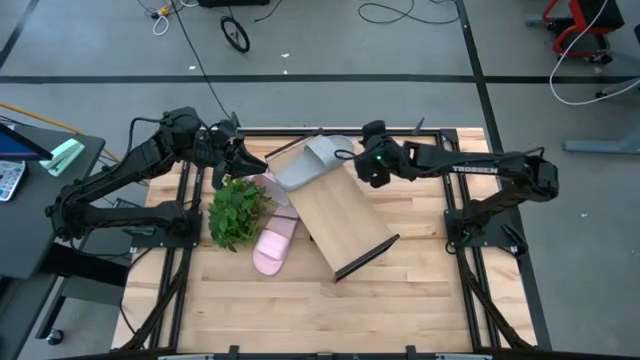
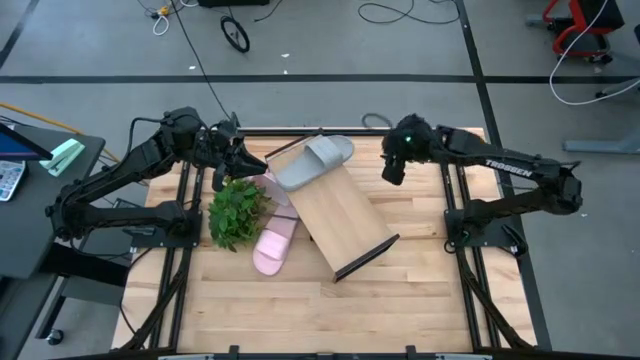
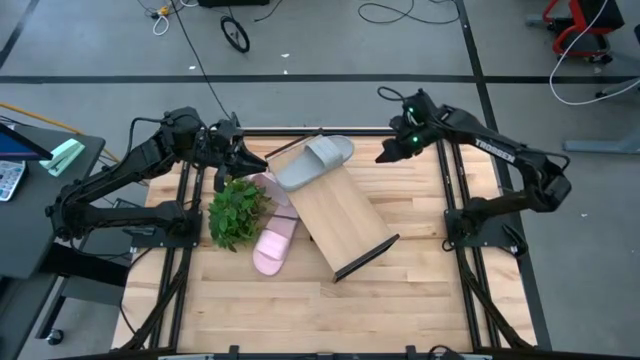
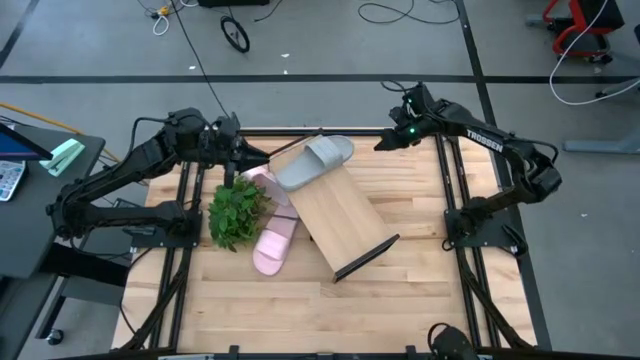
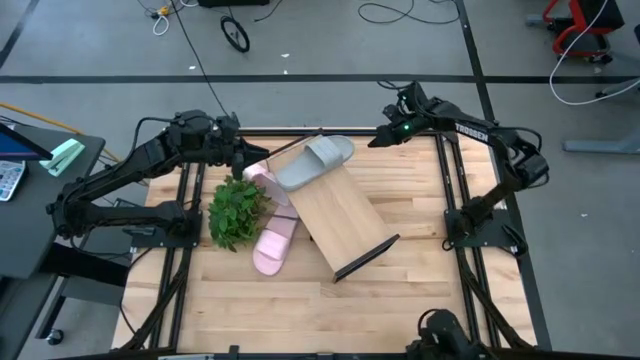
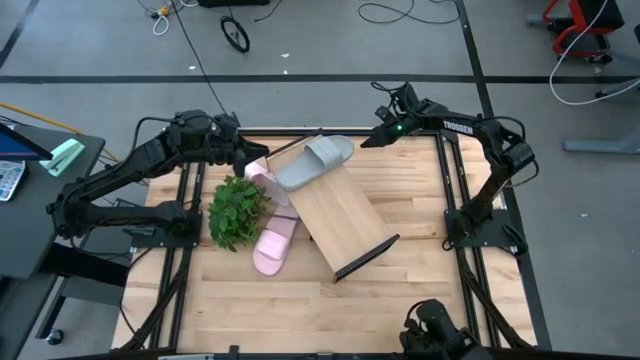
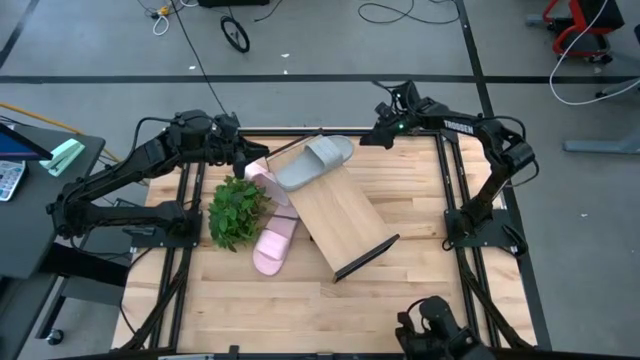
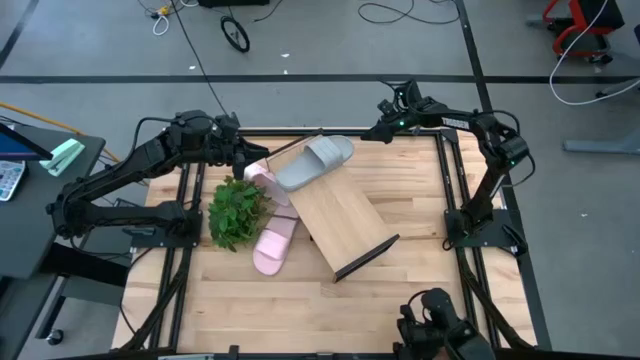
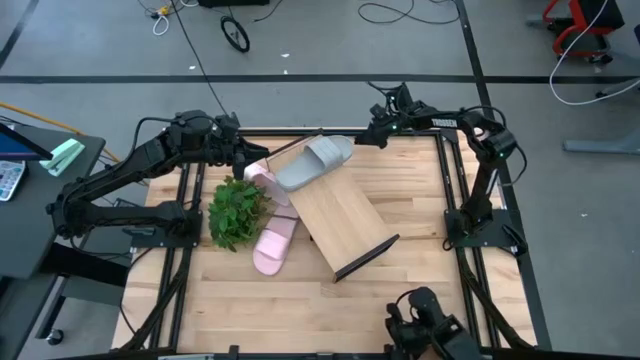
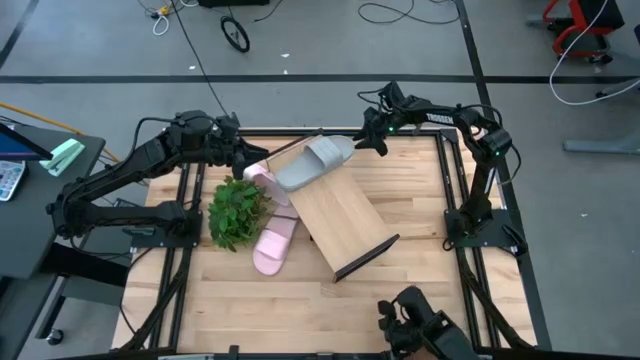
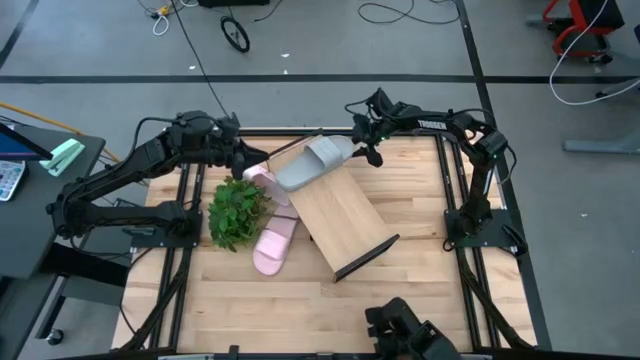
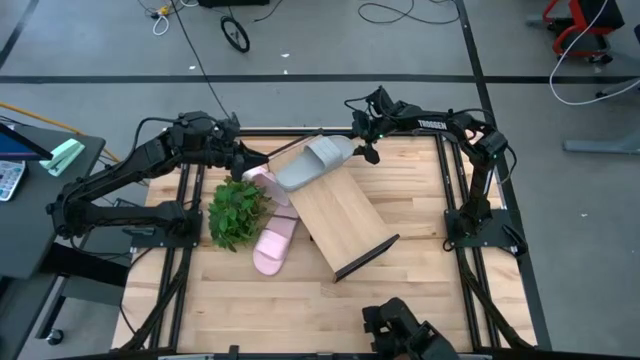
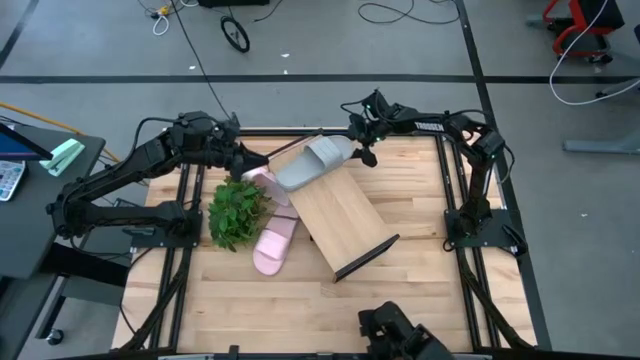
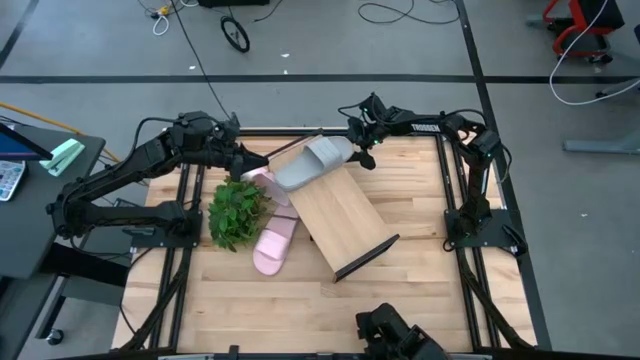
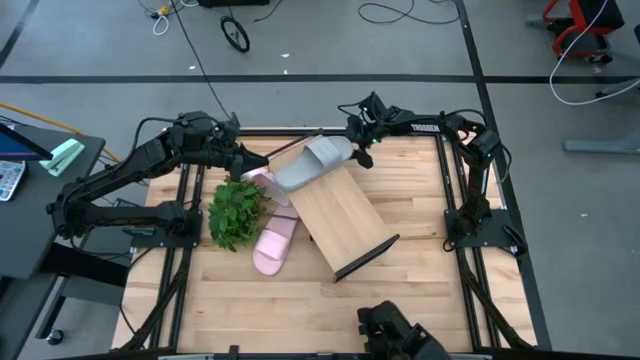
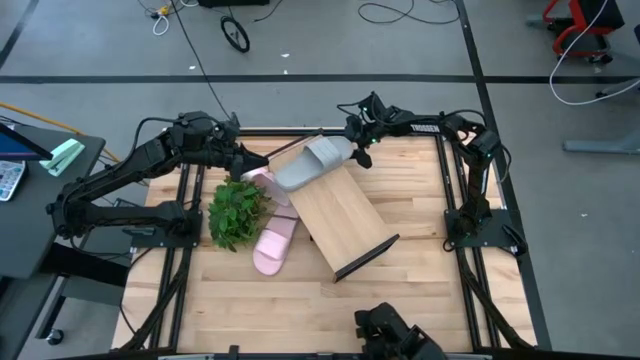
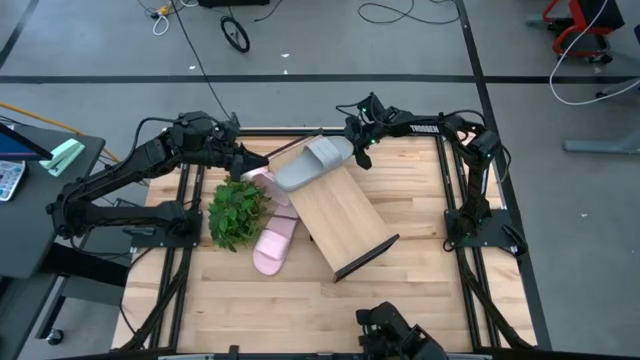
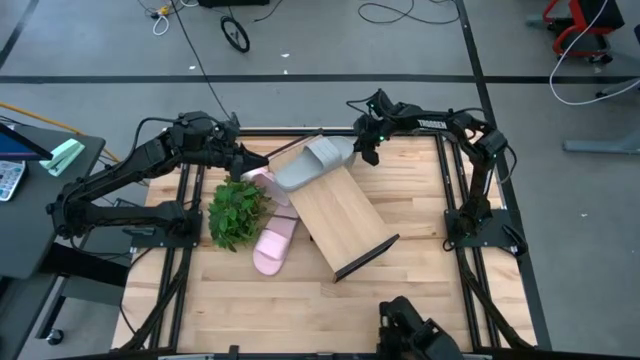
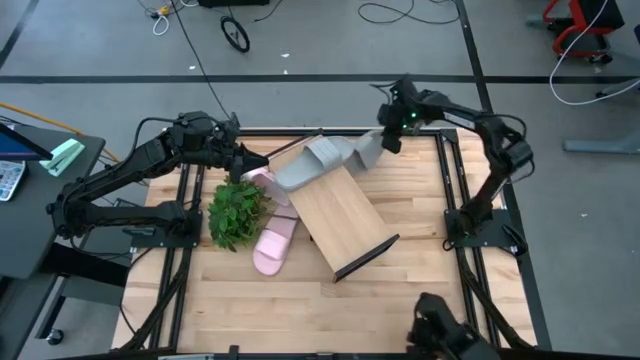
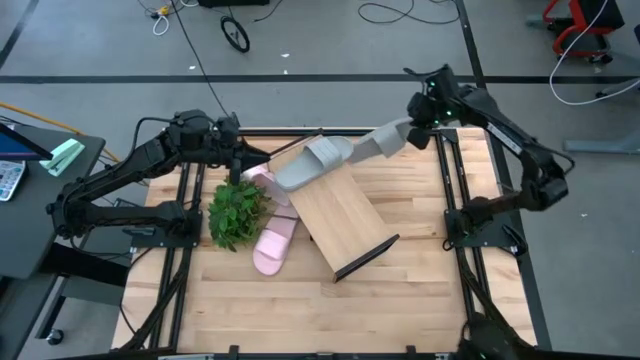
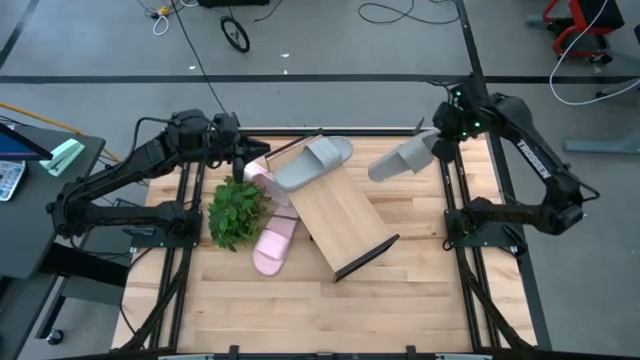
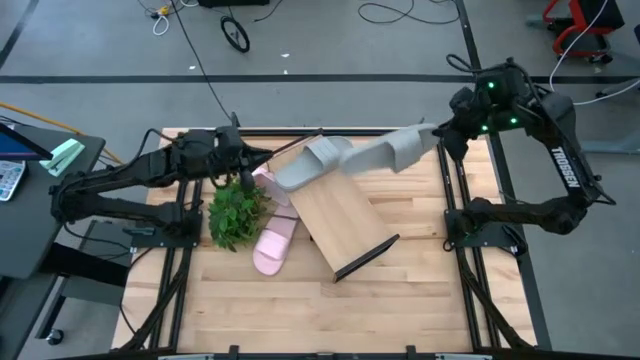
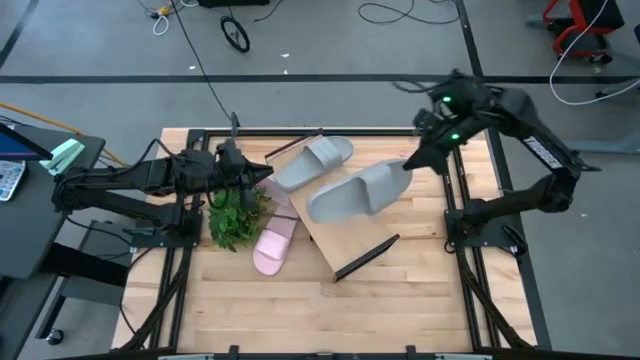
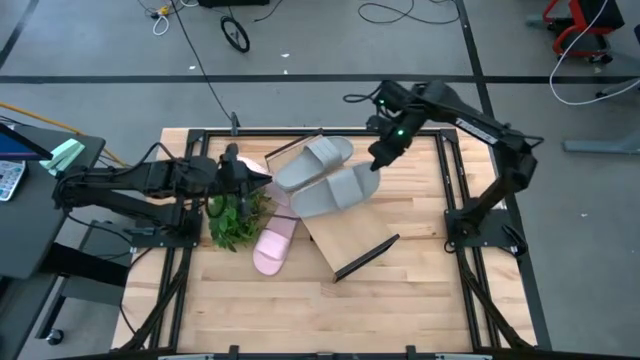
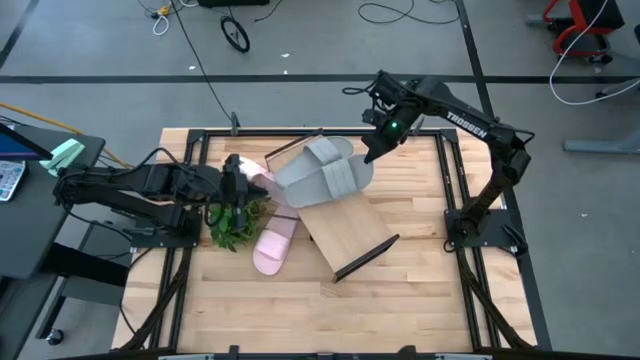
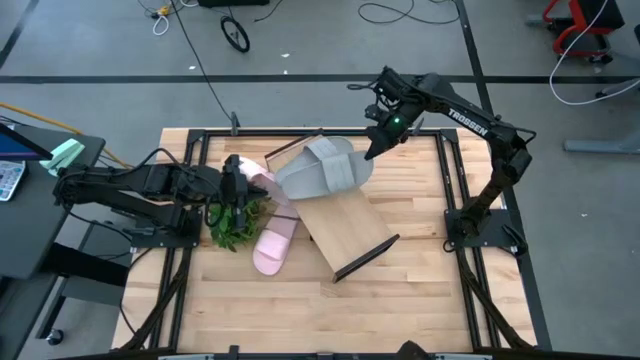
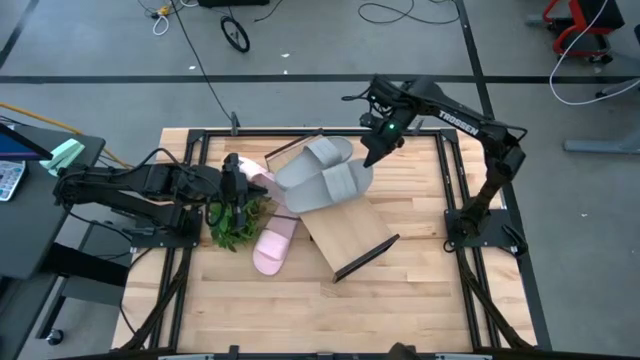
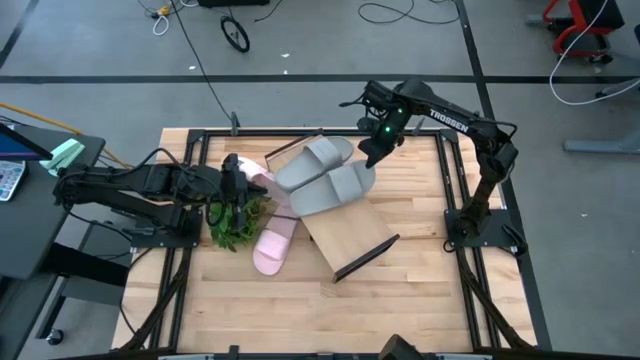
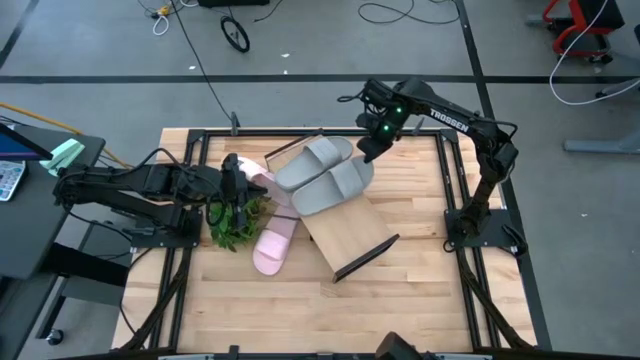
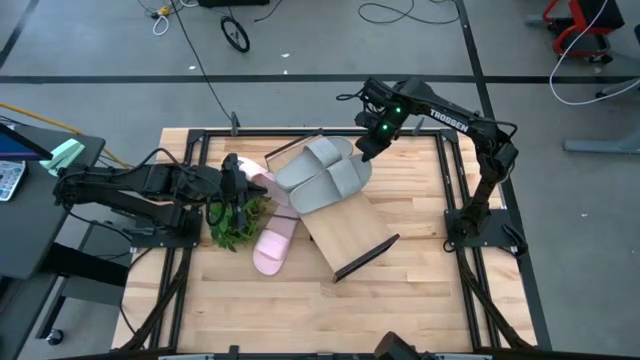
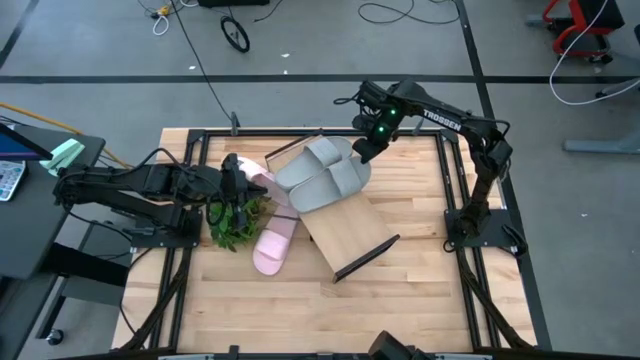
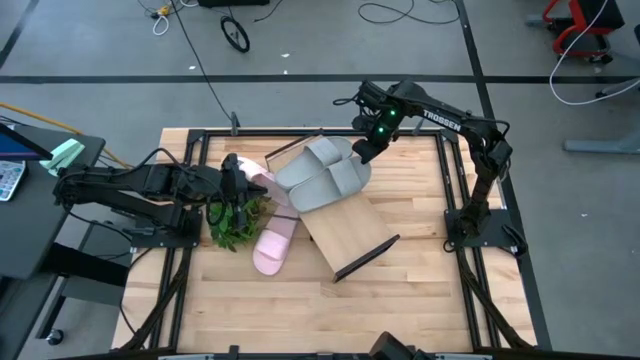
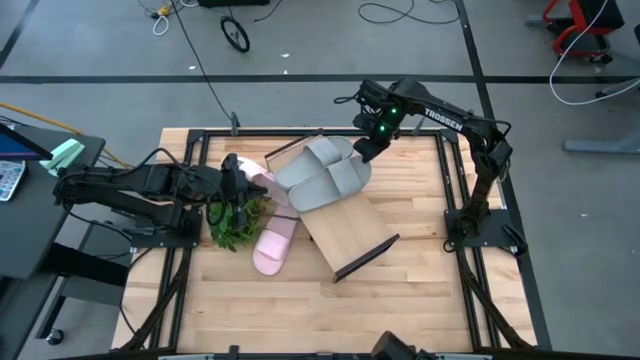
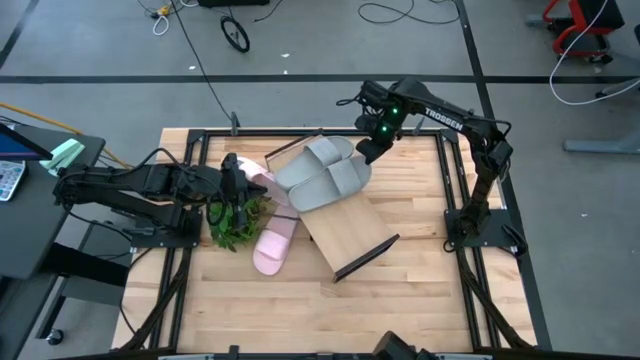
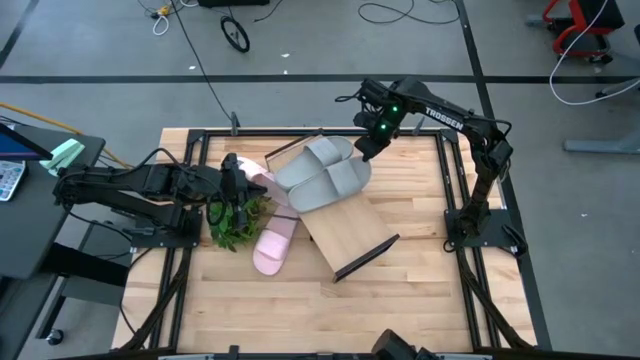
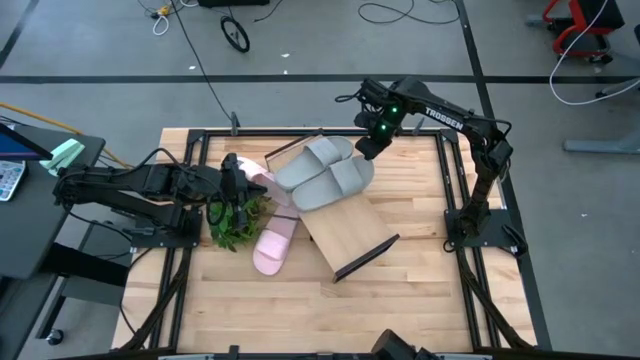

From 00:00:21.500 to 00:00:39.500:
Task: Pick and place slides into the shelf
Put the gray slide on the shelf

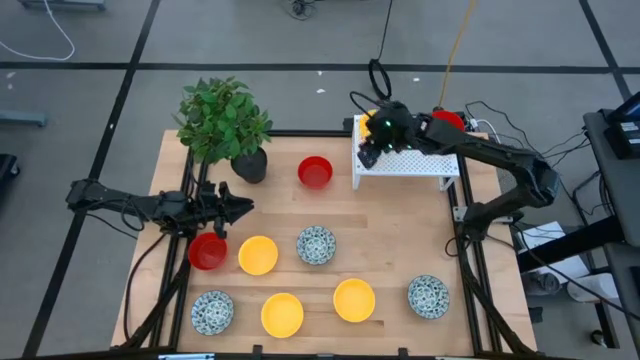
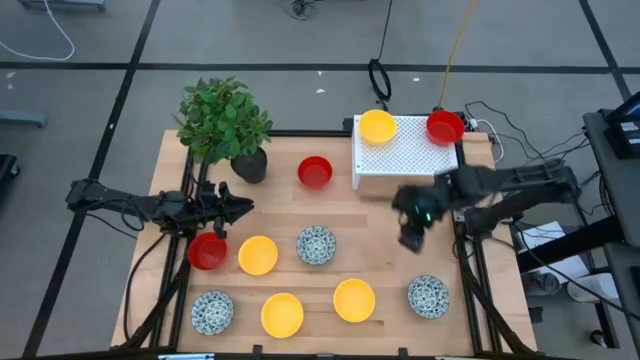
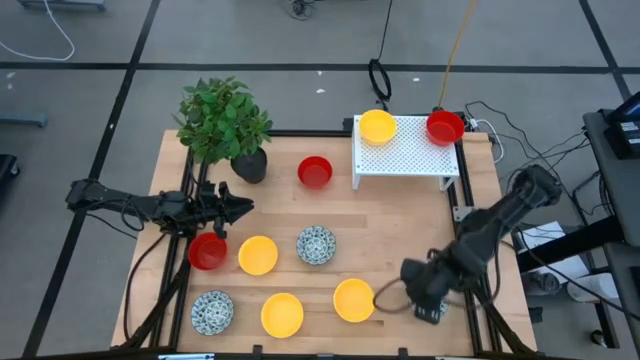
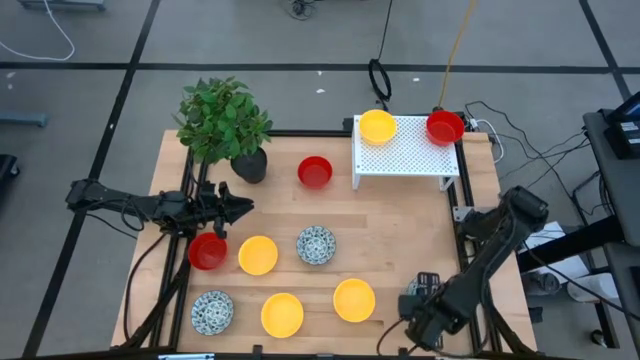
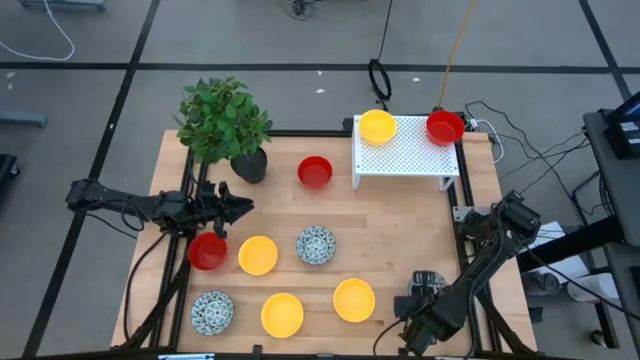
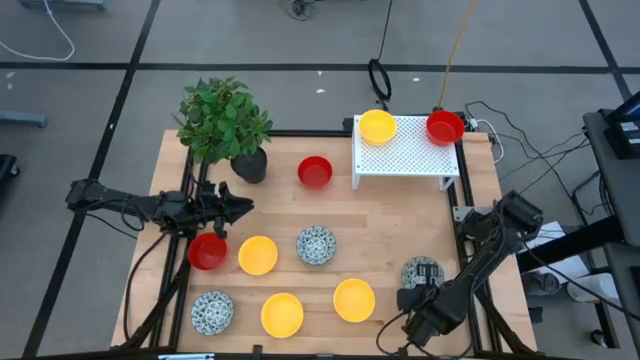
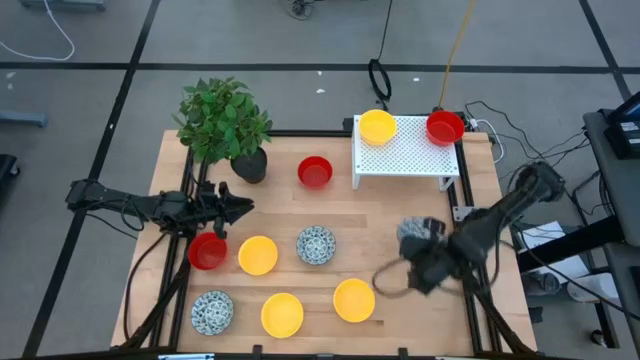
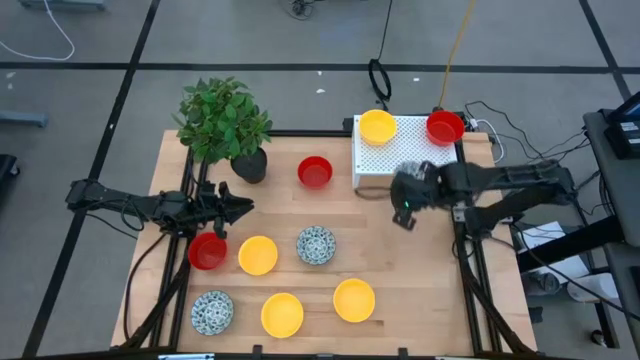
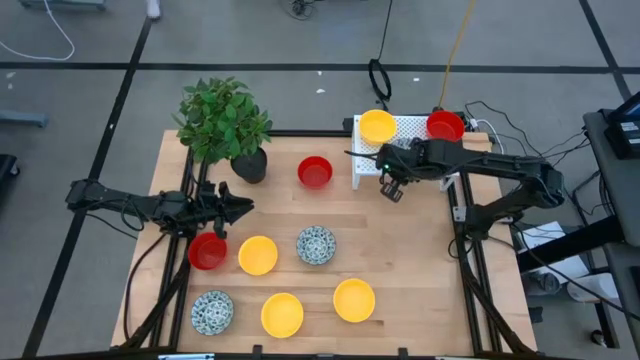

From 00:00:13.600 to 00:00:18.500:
Task: Pick & Place Mini bowls
Put the blue bowl on the shelf
